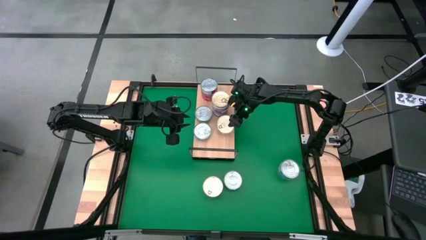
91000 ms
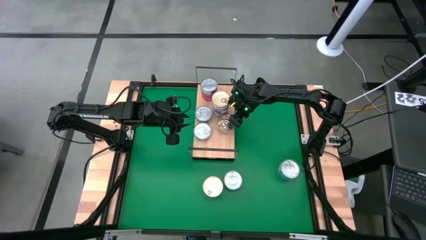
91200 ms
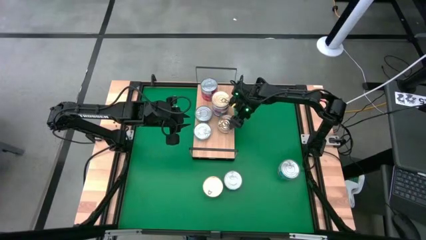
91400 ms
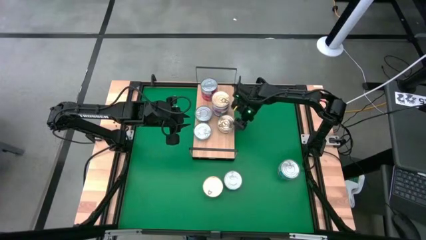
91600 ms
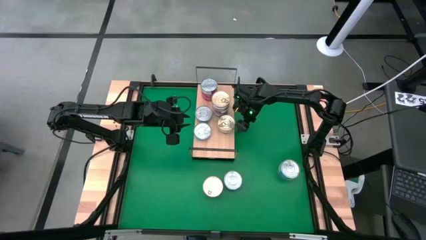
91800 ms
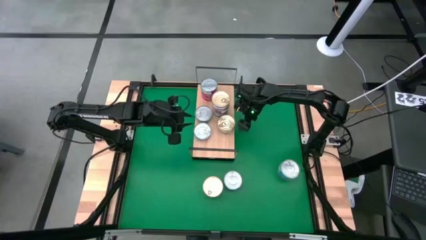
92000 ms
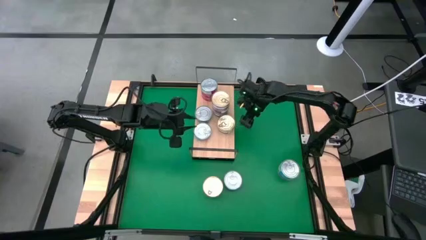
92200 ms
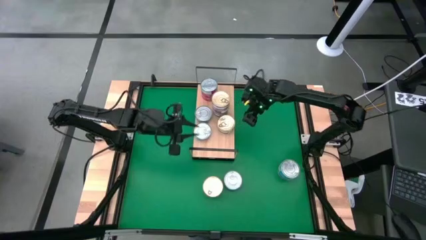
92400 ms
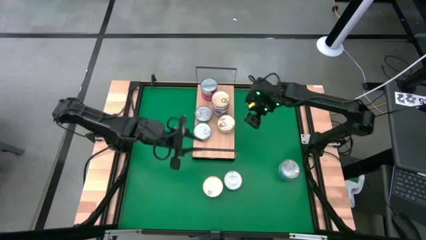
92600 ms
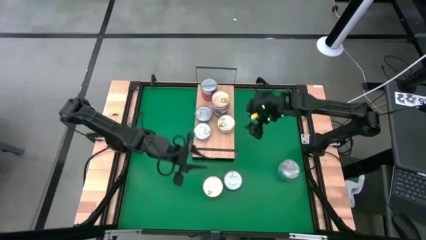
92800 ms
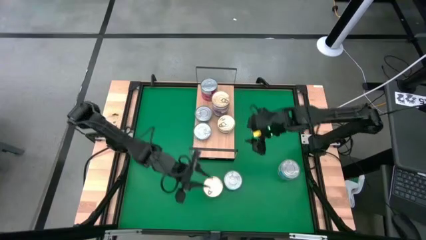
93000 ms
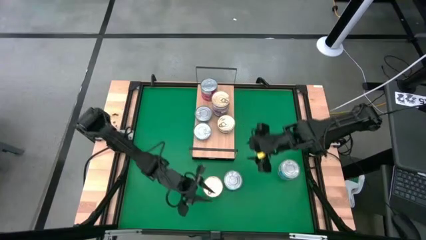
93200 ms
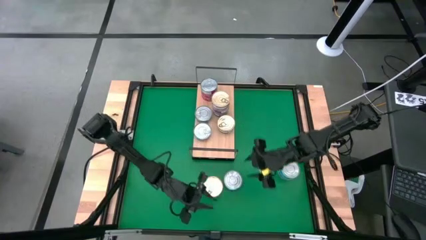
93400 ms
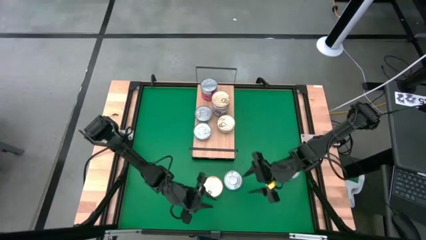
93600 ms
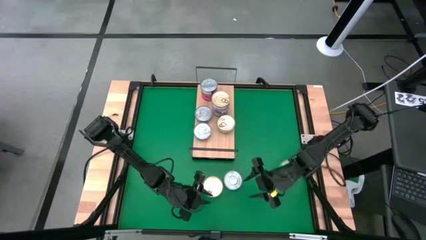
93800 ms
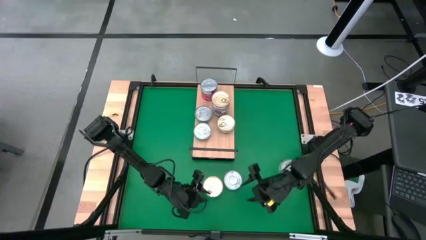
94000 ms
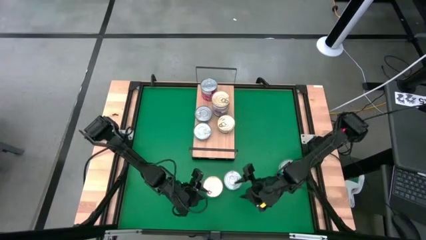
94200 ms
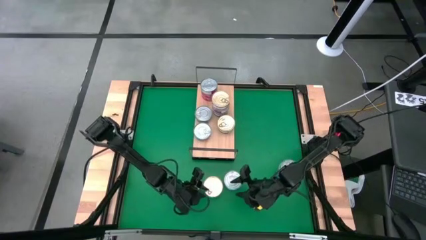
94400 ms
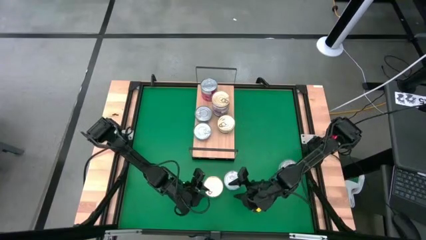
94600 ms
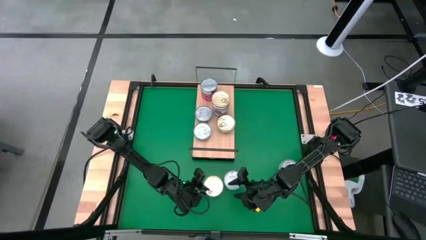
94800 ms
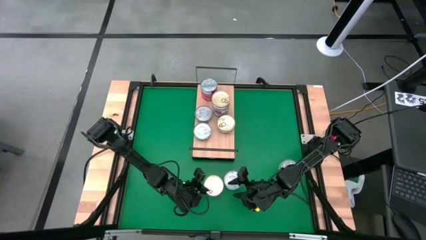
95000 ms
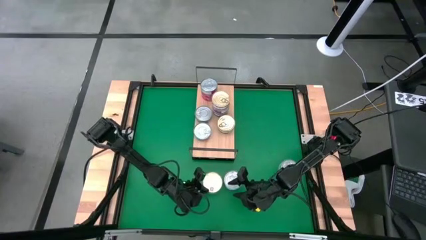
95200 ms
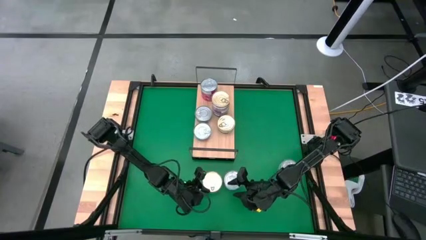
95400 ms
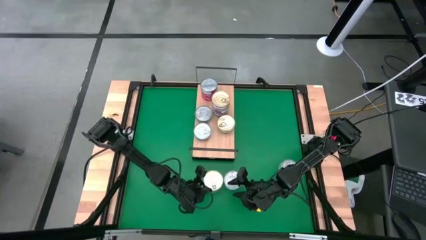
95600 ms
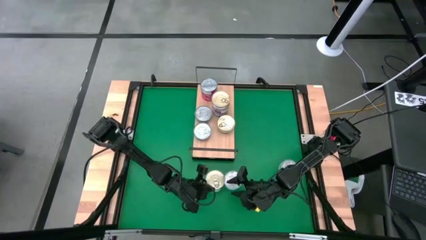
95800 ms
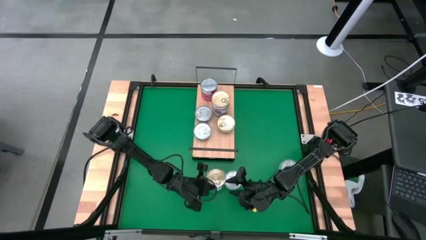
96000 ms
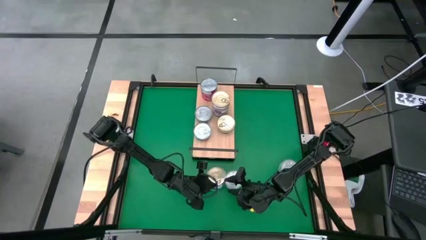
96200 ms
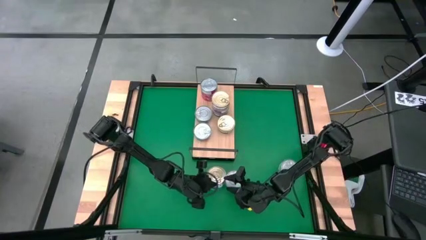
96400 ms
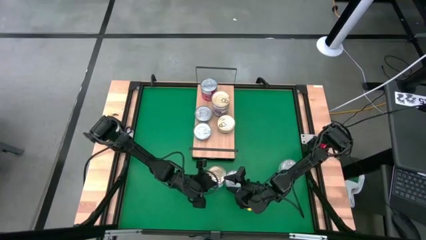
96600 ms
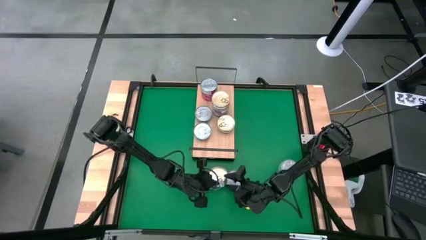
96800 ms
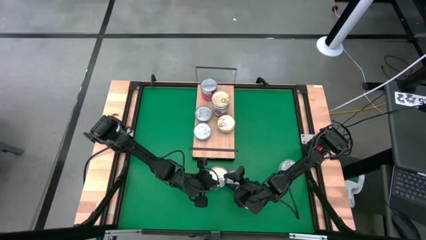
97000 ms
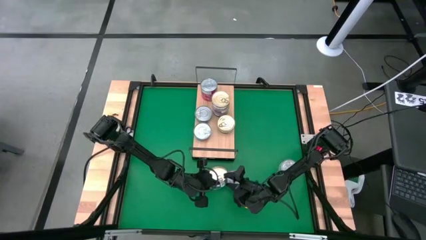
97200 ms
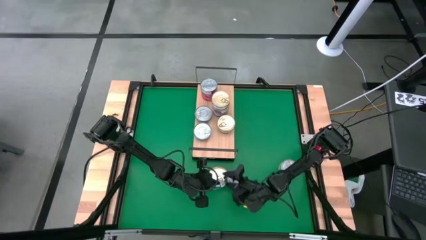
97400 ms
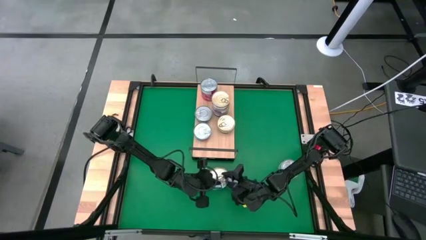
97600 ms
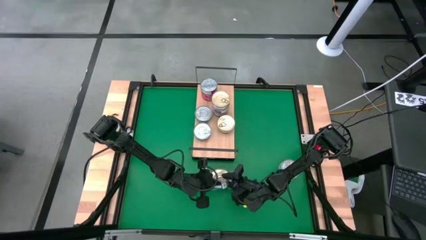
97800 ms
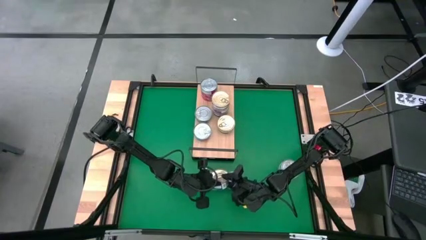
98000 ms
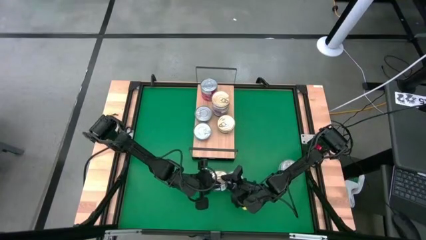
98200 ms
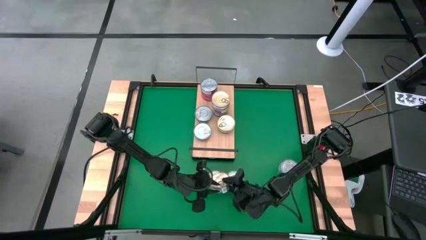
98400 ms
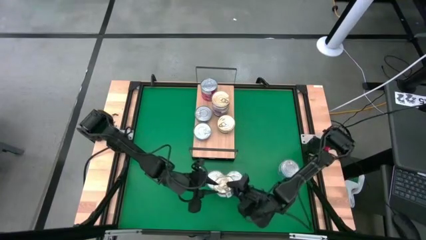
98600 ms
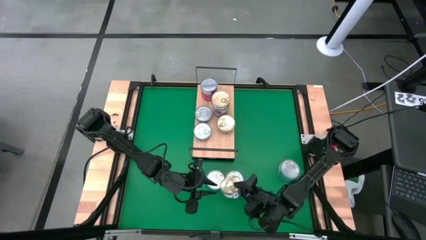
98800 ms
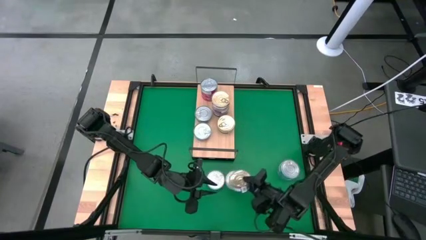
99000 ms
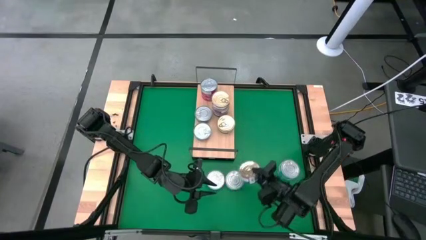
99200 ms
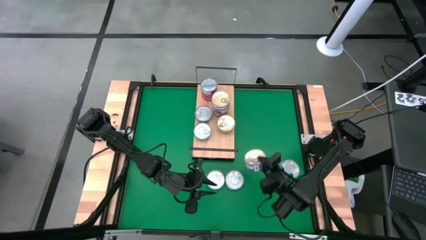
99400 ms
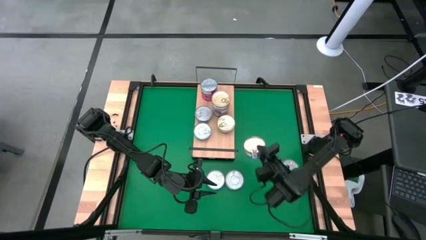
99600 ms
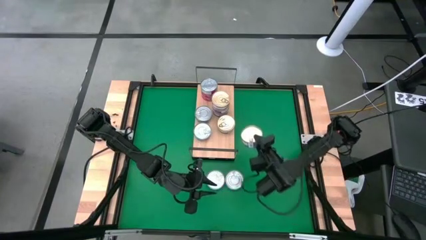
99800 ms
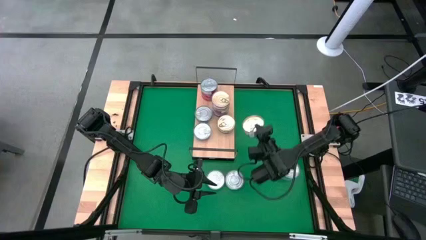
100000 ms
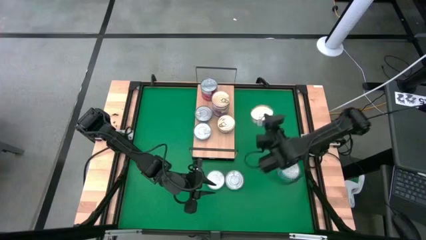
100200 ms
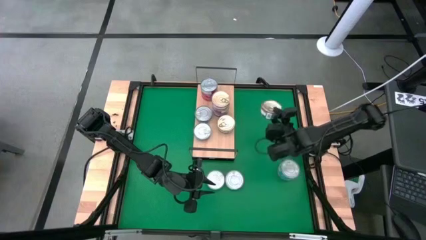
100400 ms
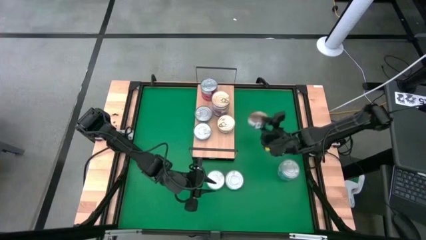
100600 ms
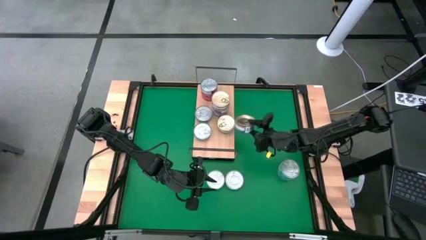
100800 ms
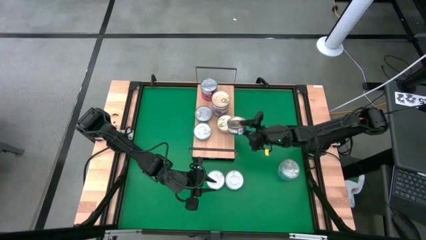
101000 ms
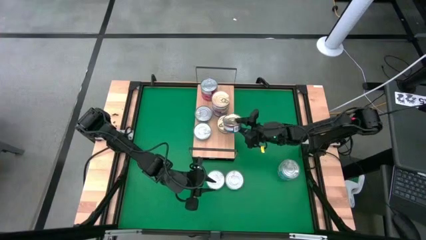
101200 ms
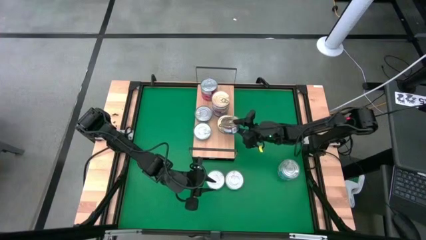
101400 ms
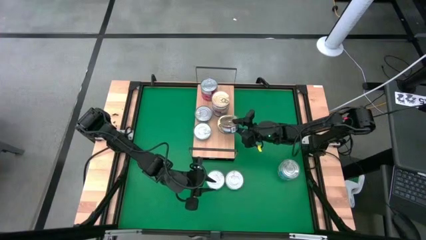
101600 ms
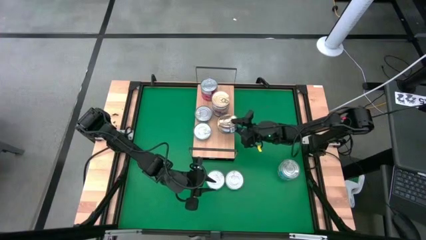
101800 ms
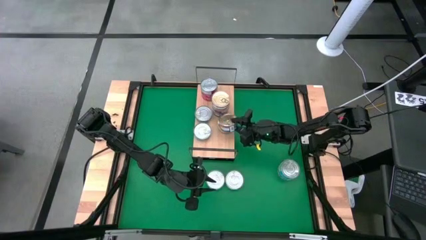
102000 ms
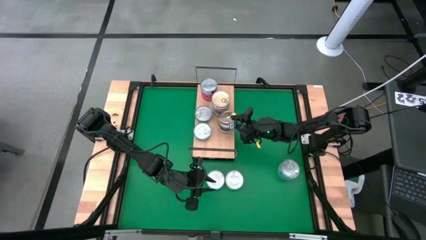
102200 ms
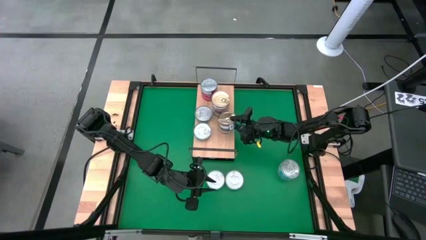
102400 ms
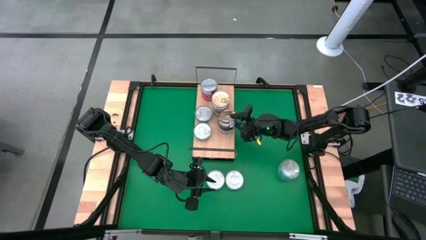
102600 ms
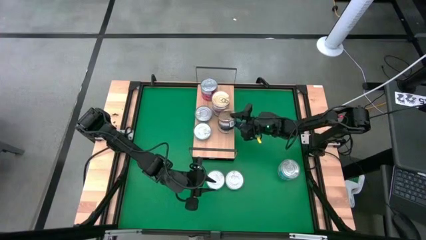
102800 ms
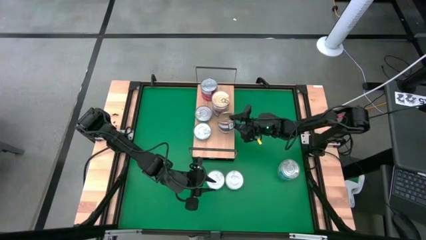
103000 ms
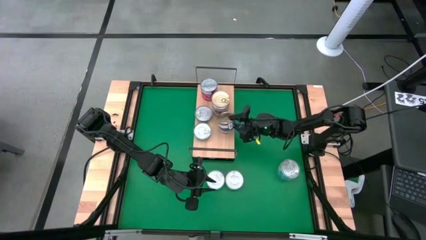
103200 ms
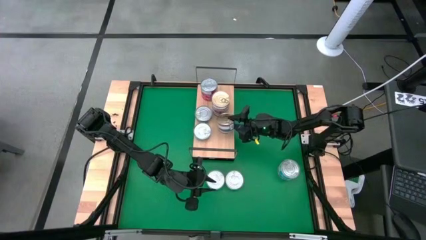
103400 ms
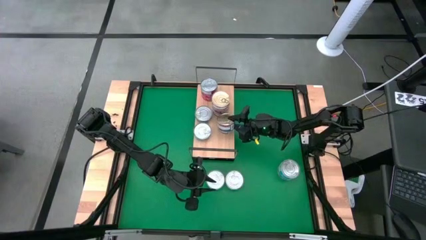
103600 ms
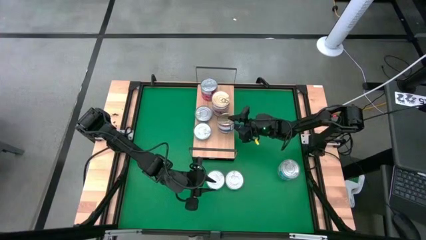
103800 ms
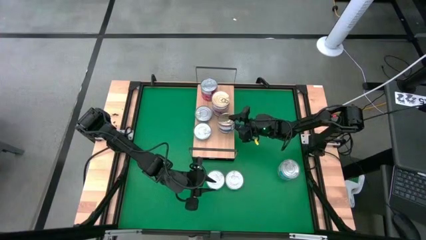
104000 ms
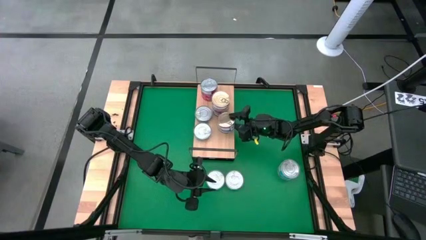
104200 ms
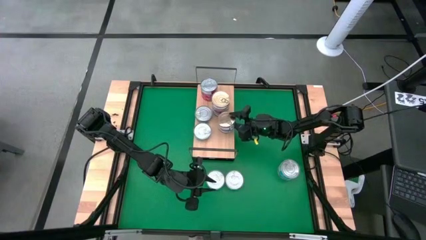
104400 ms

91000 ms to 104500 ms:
Task: Stack canned seafood by type on shelf
Stack the dark blue tuna can on top of the dark blue tuna can on the shelf

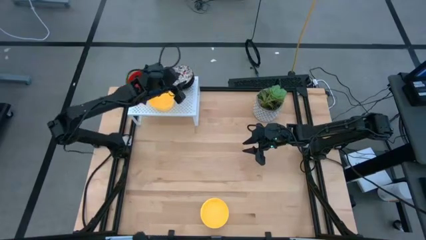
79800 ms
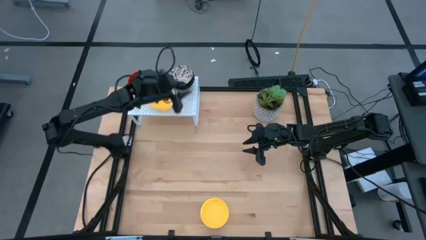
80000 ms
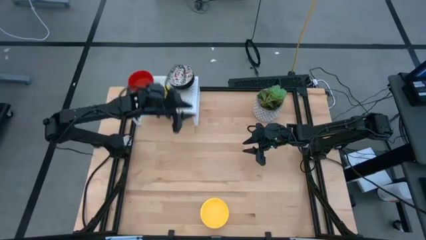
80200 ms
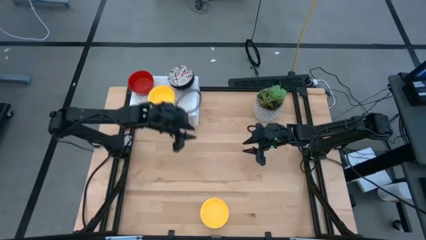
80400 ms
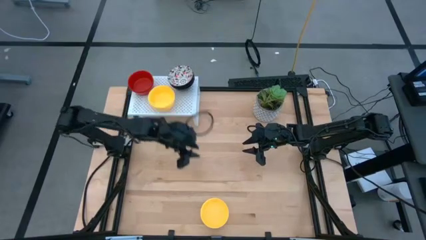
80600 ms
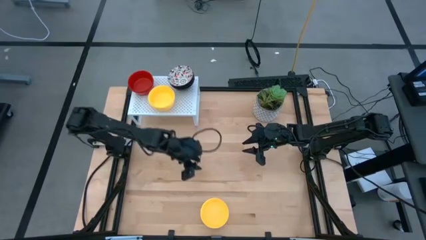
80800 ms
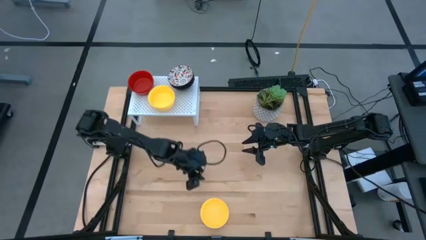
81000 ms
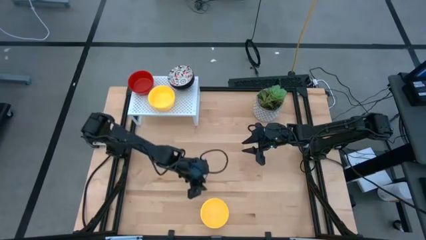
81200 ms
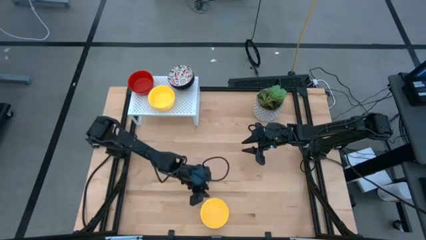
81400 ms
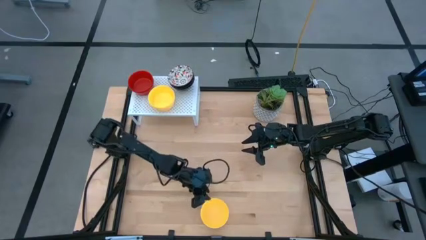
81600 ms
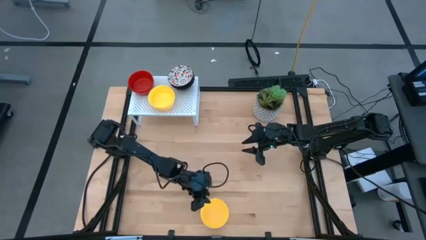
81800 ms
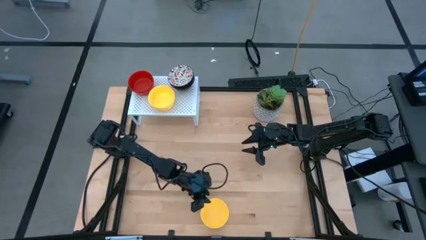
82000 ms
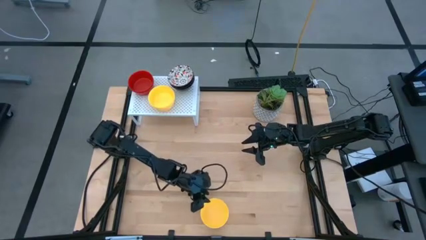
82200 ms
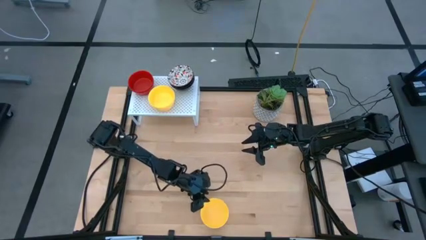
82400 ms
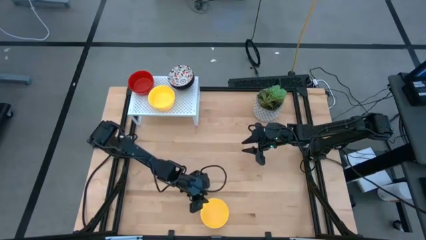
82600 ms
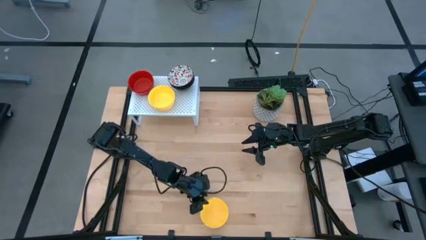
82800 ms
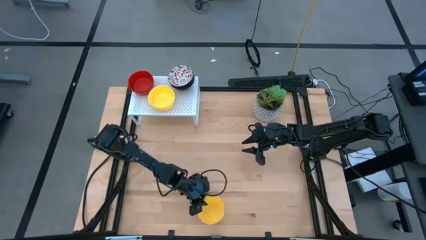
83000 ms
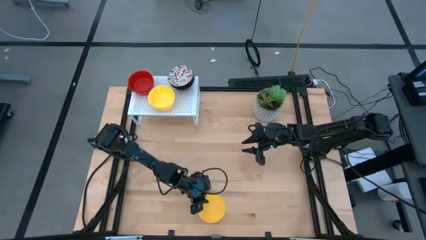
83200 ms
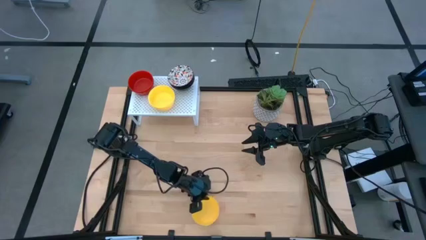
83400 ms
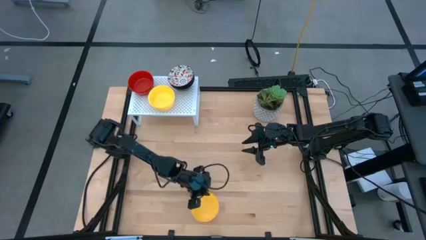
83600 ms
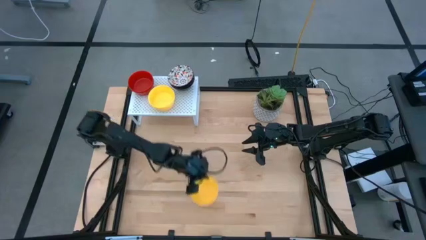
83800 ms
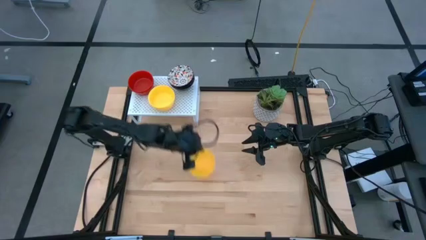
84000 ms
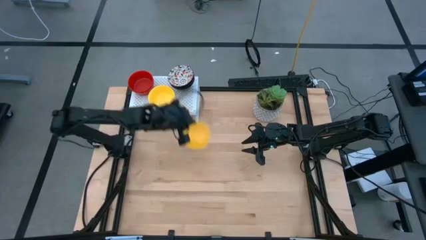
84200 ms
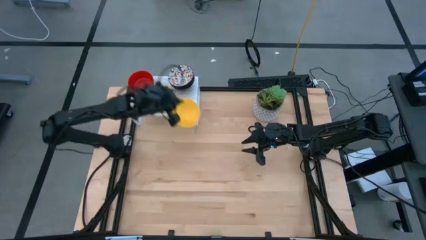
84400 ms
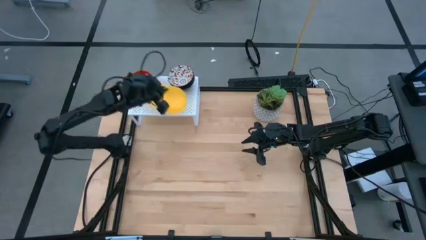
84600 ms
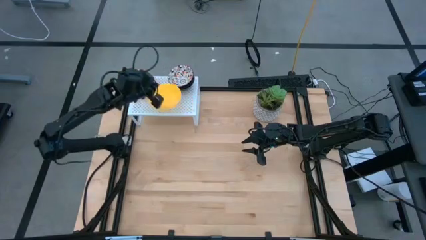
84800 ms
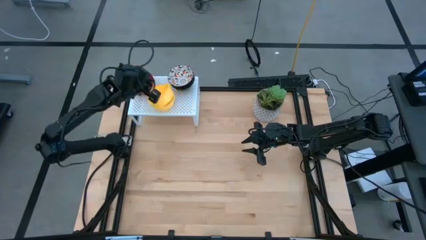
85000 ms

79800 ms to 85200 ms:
Task: Pick & Place Mini bowls
Stack the yellow bowl on the yellow bowl on the shelf
